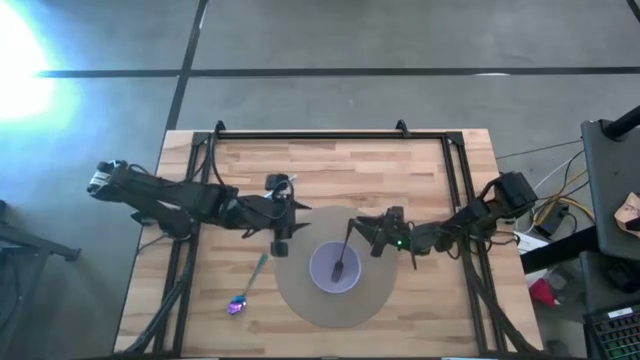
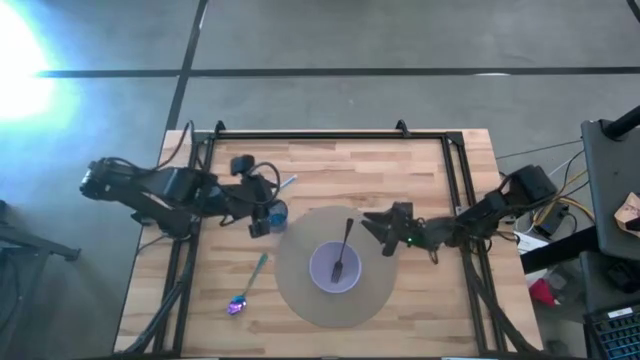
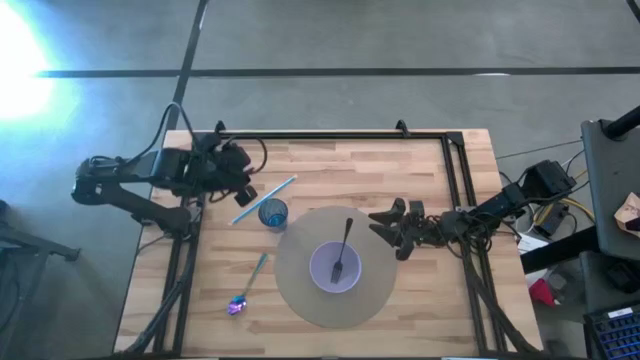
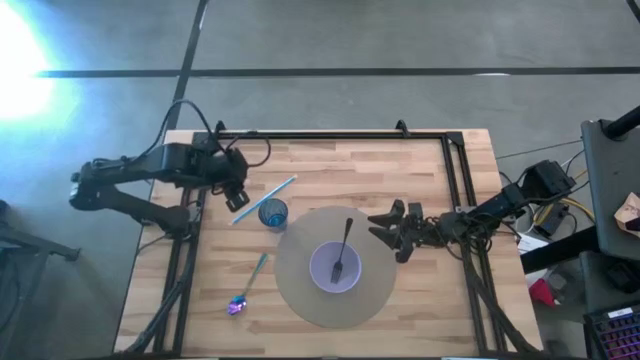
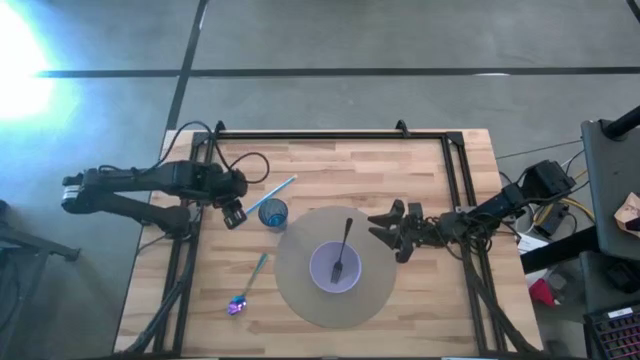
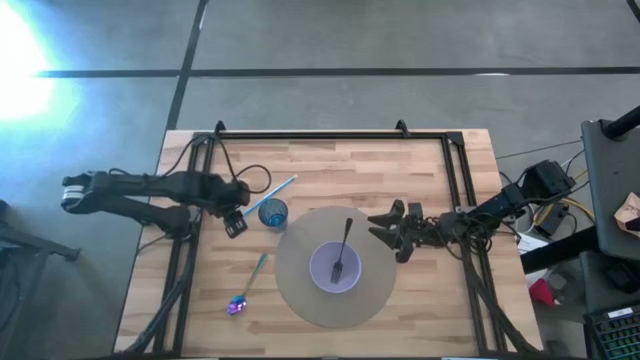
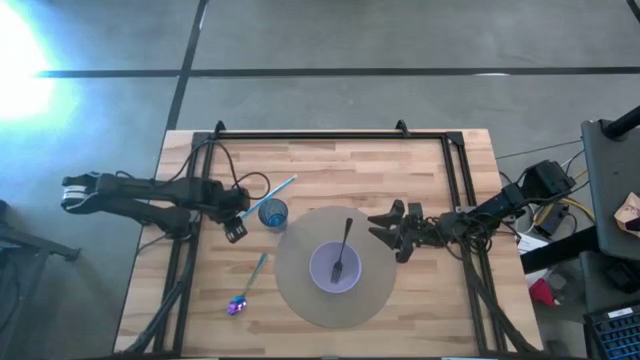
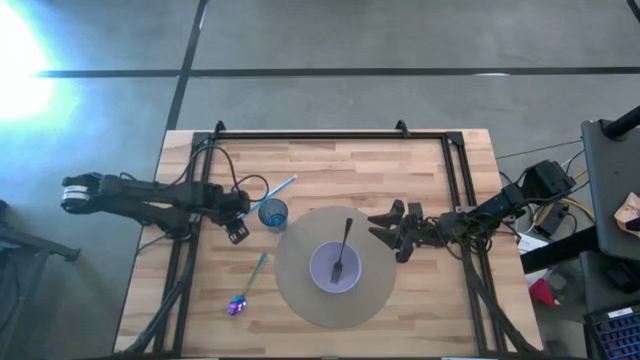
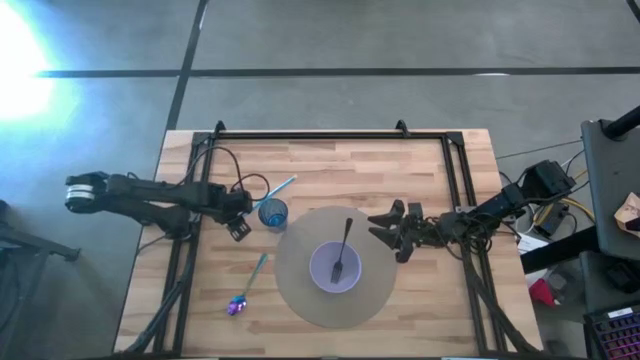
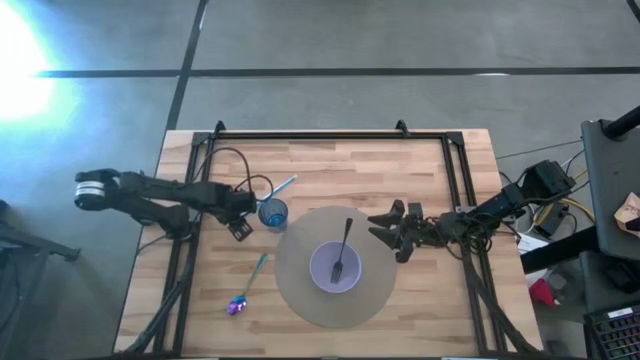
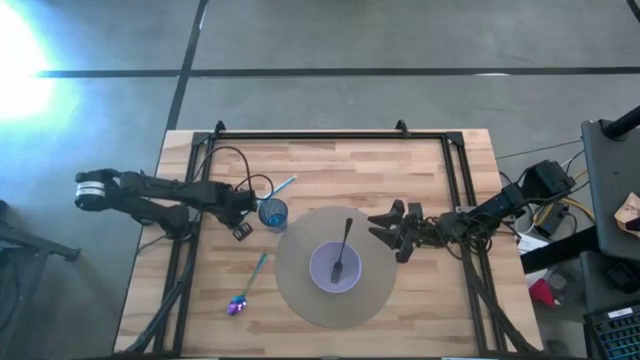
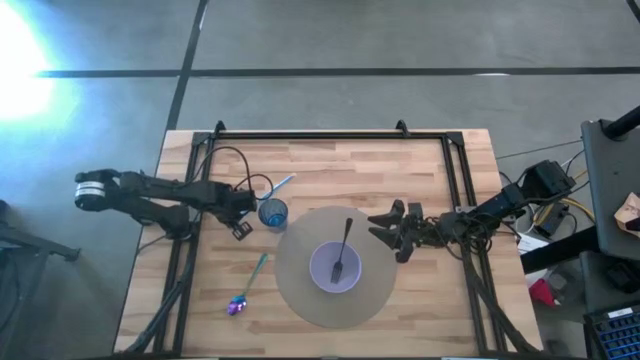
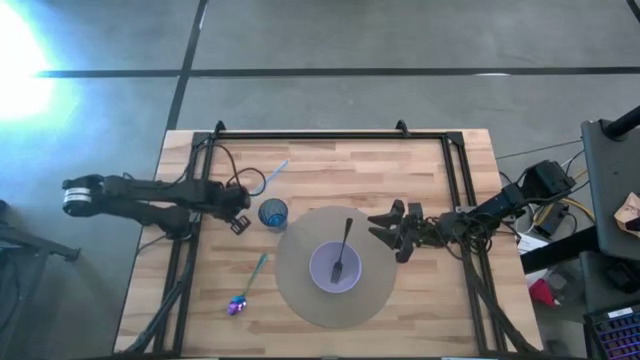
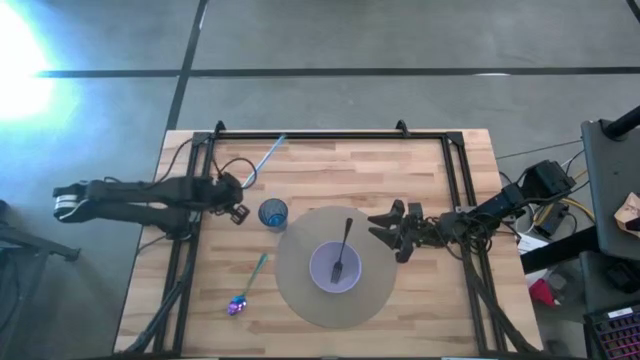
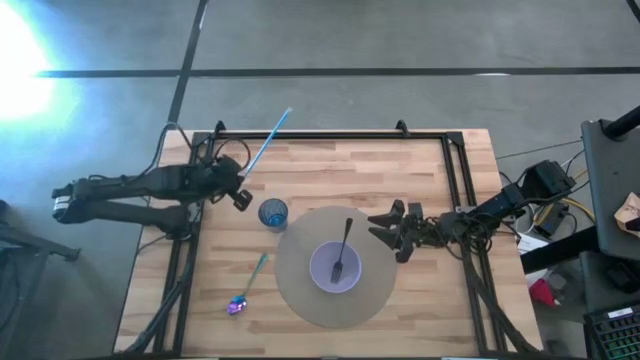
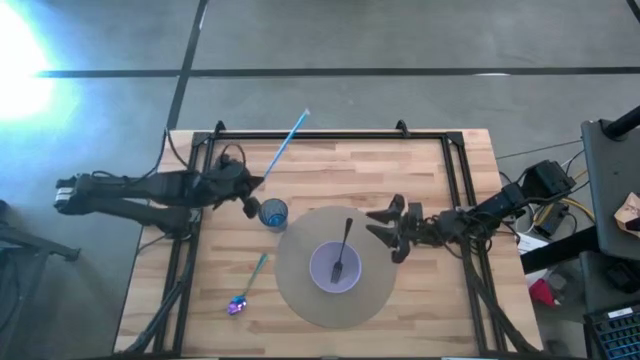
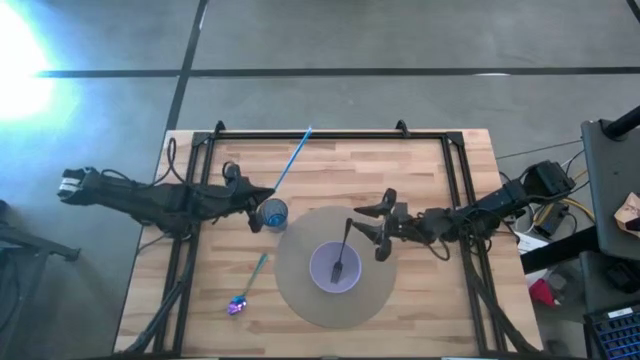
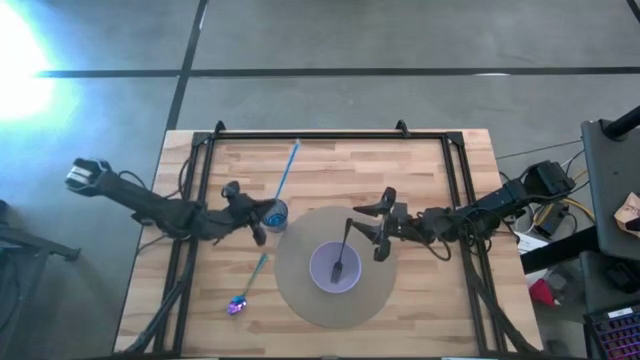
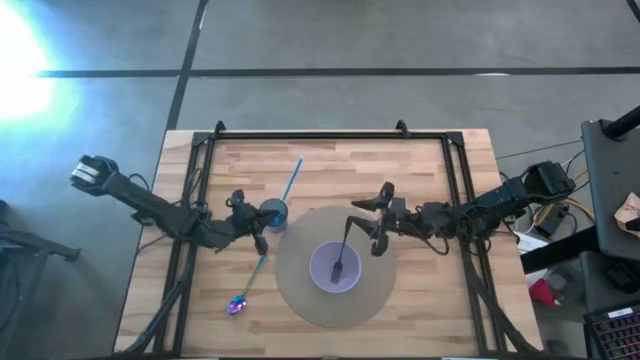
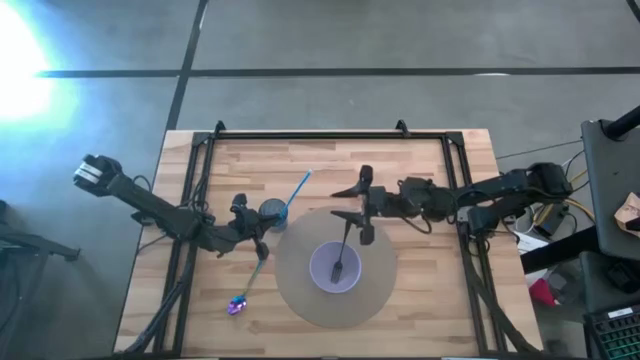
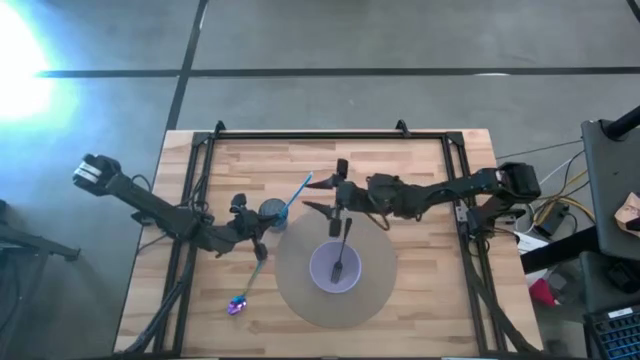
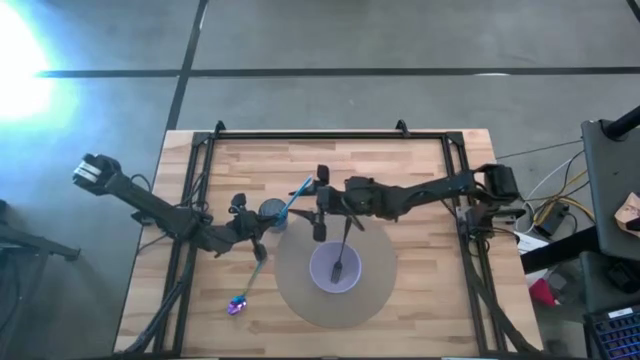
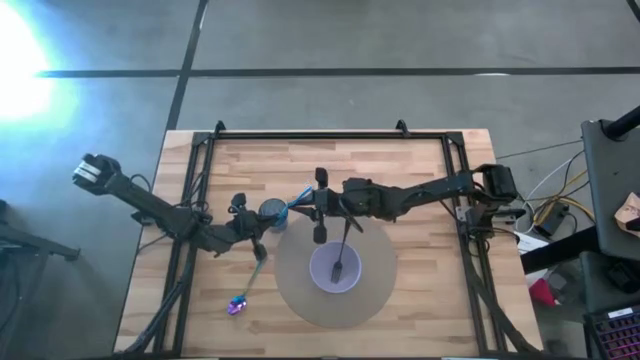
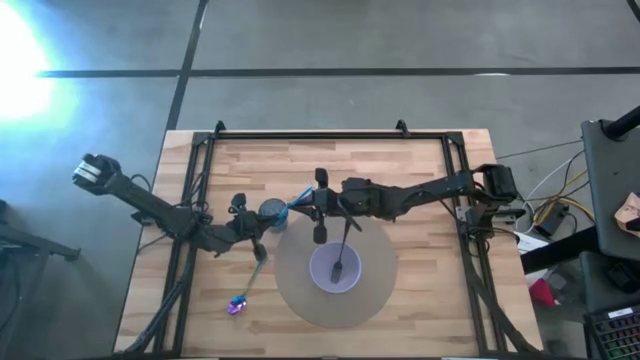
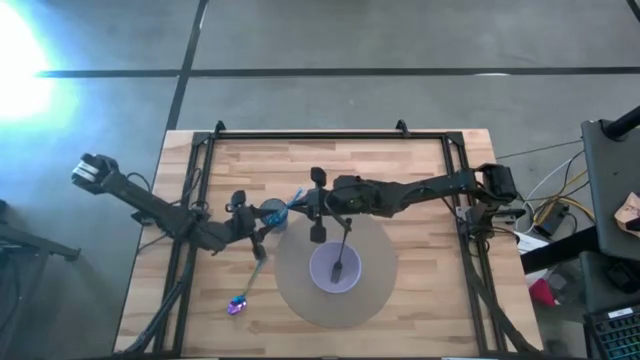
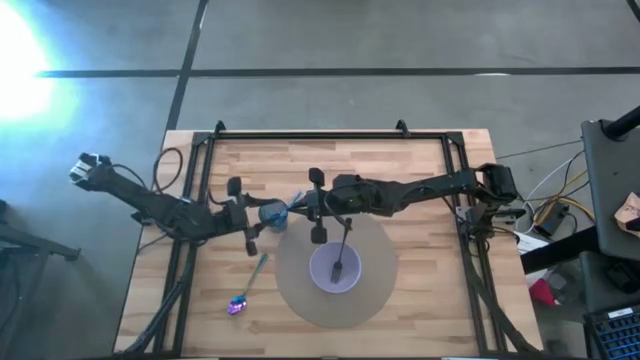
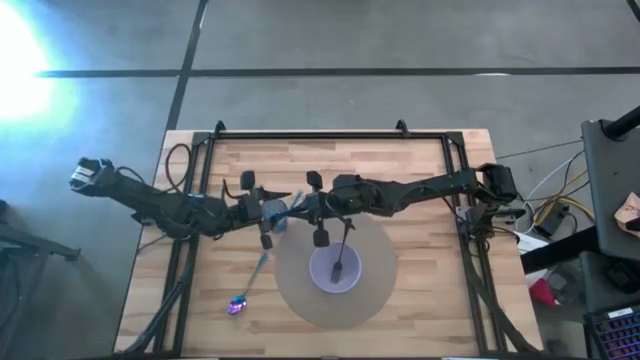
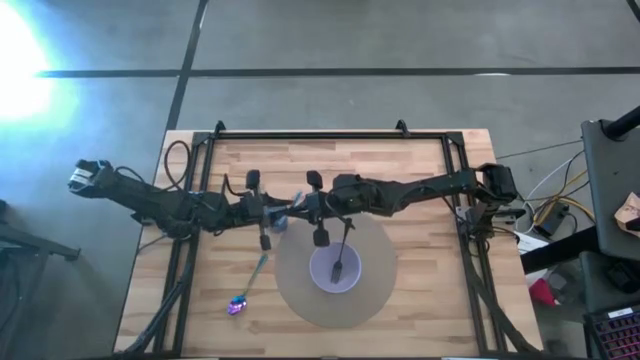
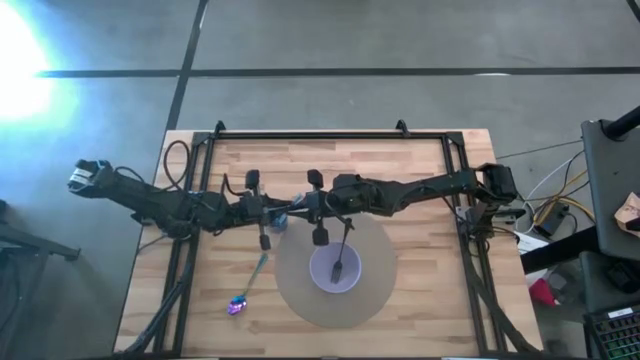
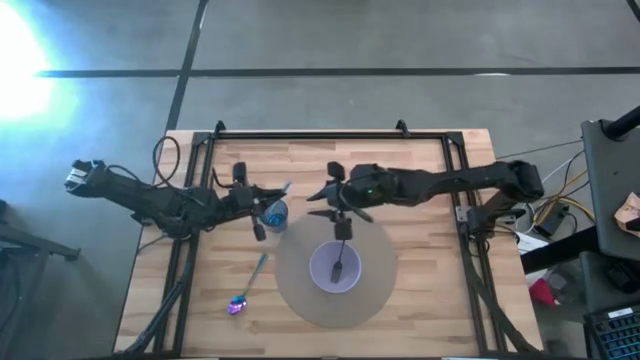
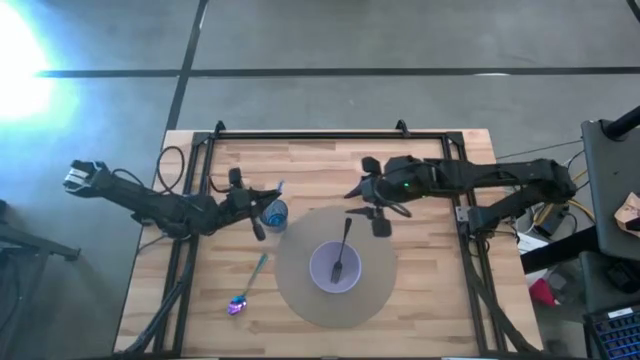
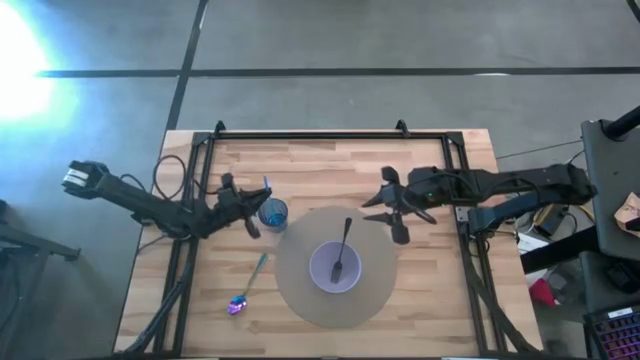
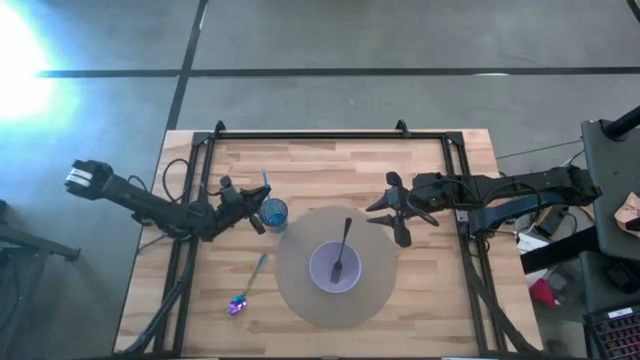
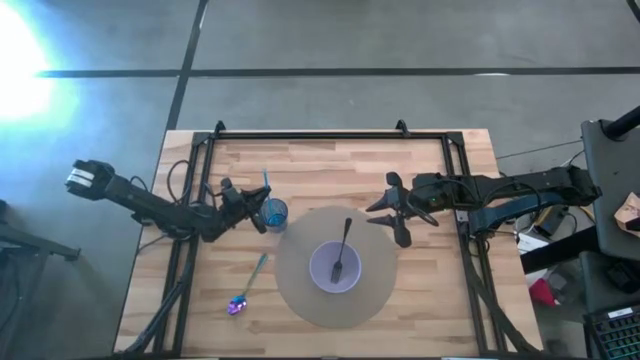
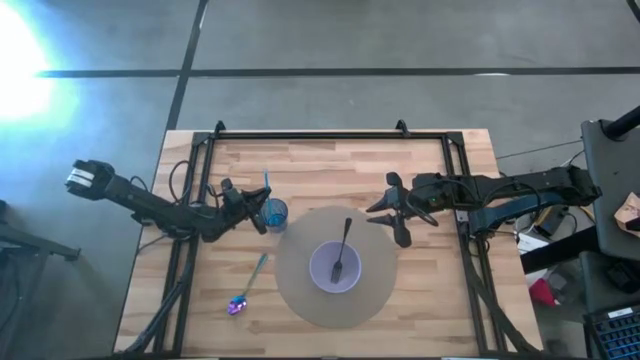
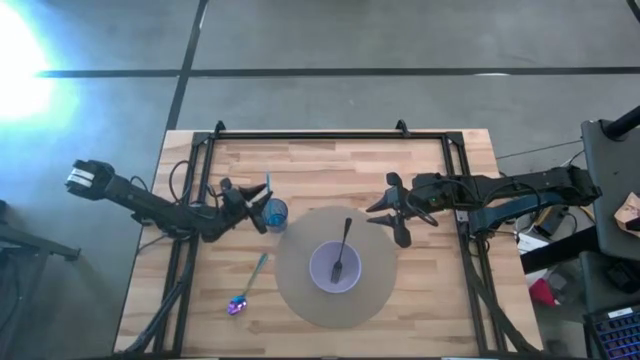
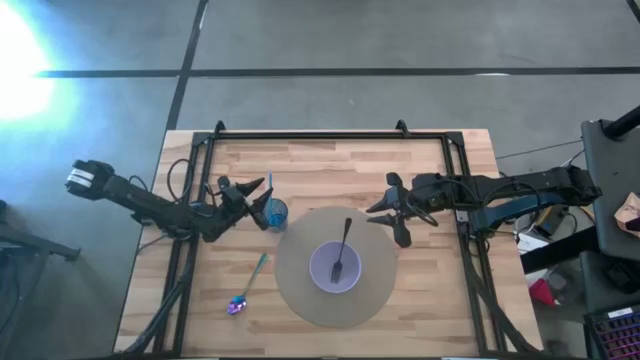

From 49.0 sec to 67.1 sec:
Task: Pick & Place Utensil
Put the blue straw into the blue cup

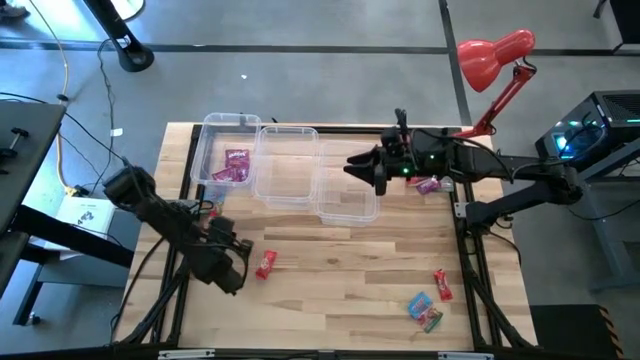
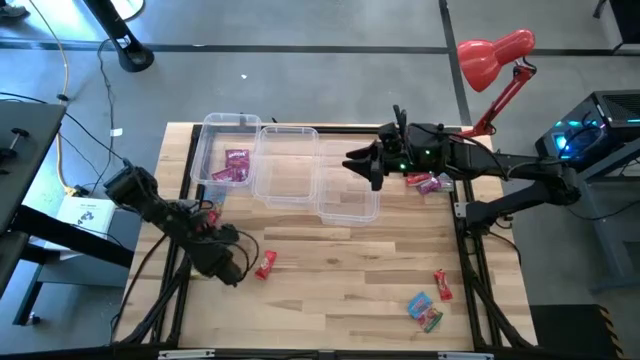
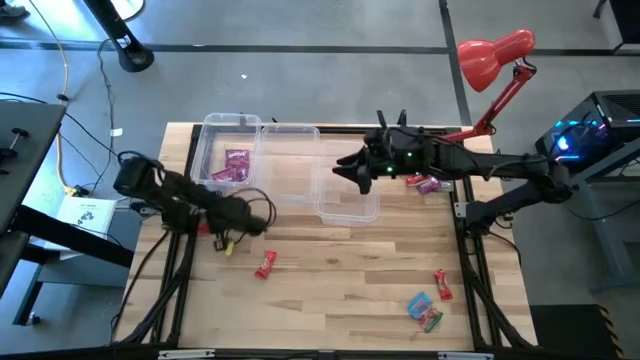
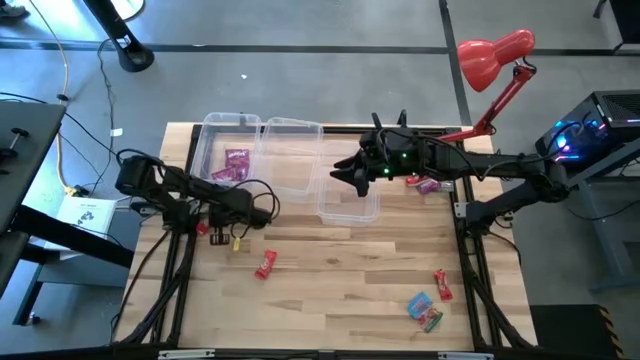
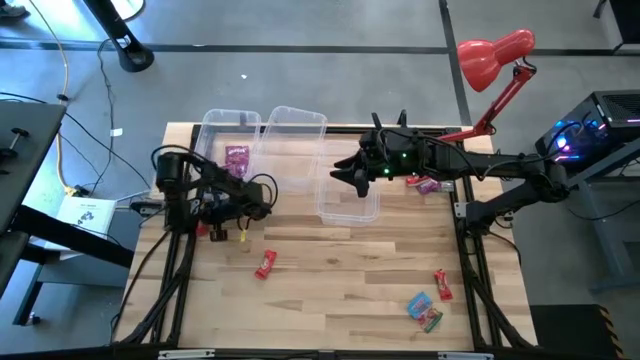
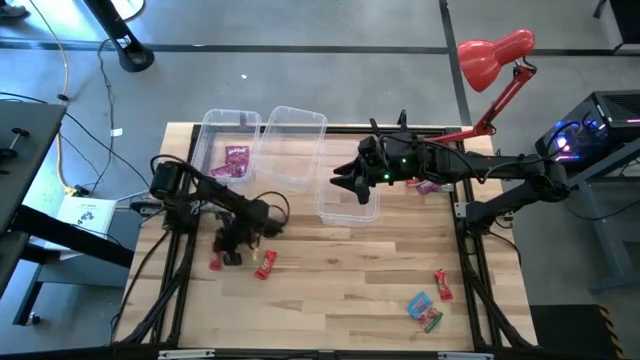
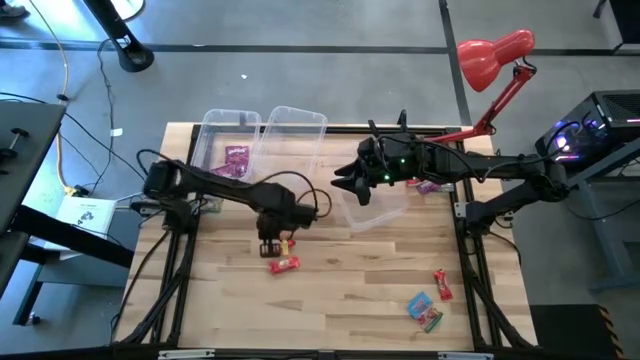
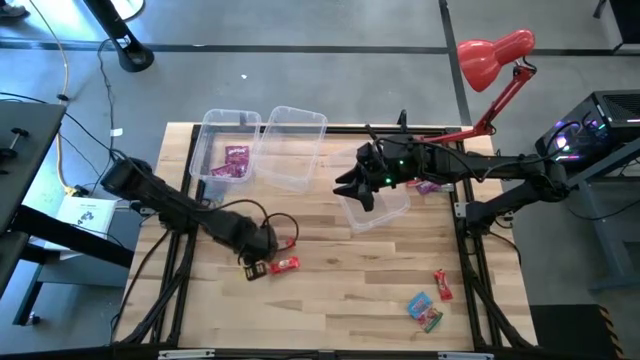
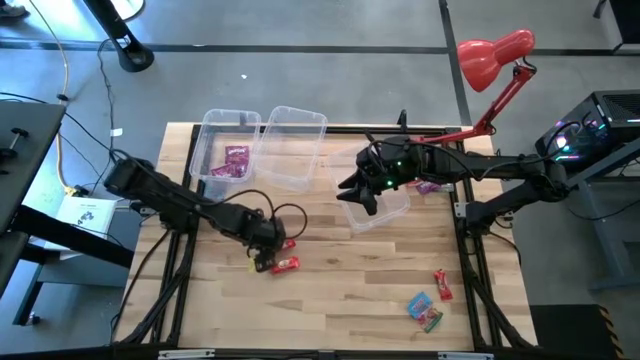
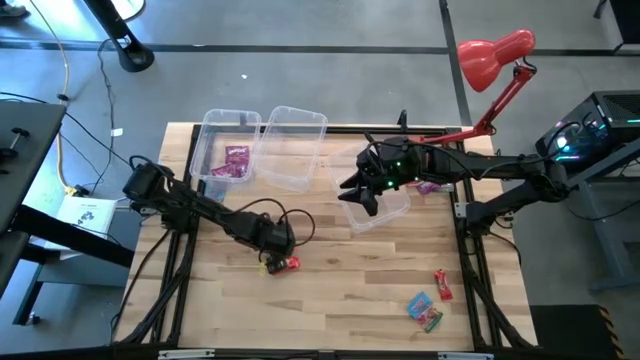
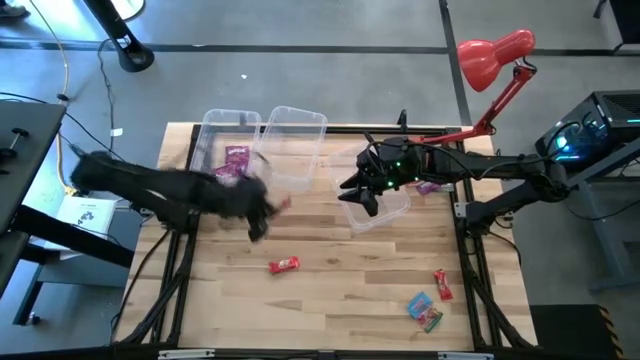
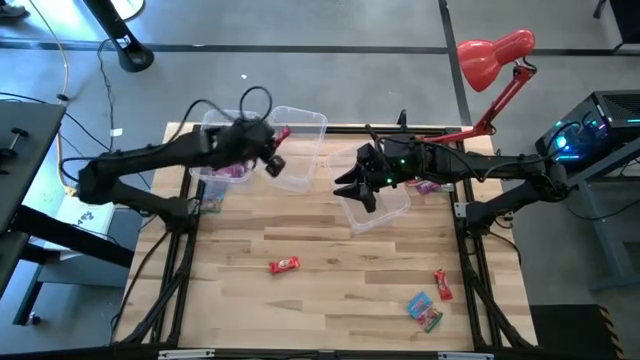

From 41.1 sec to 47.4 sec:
Task: Sort candy
Put the red candy bag into the center transparent bin
